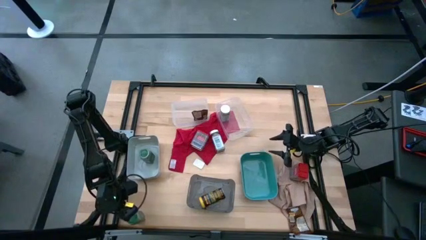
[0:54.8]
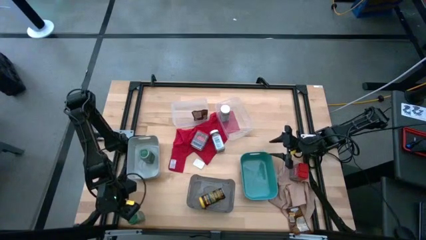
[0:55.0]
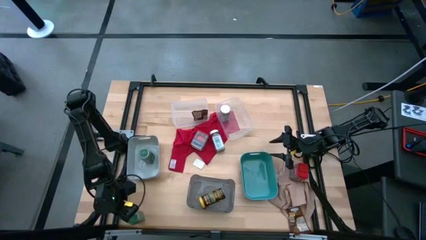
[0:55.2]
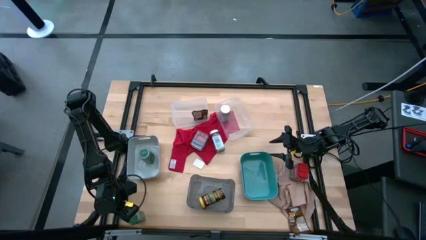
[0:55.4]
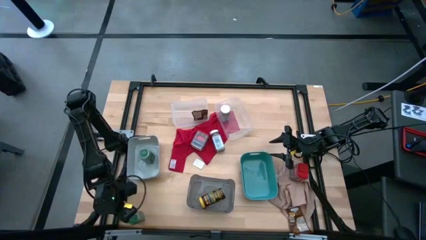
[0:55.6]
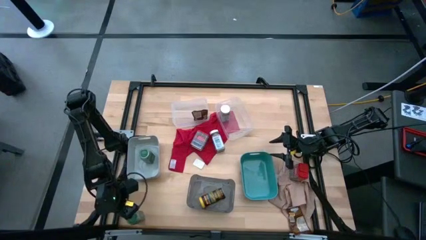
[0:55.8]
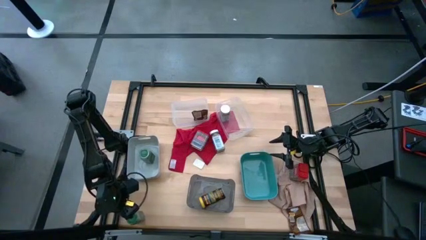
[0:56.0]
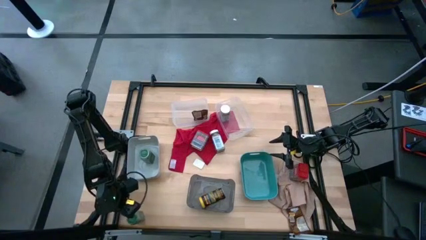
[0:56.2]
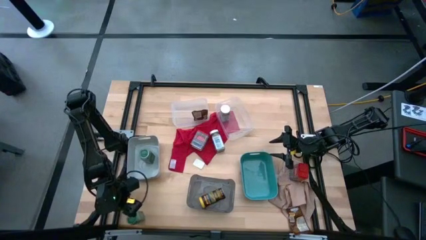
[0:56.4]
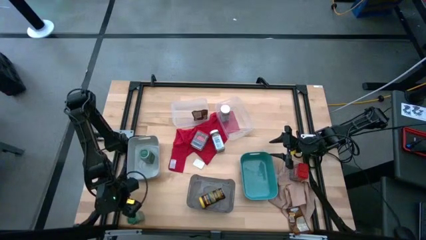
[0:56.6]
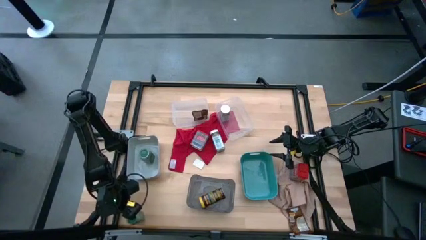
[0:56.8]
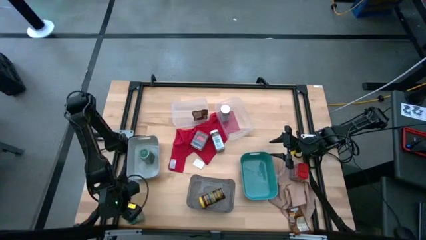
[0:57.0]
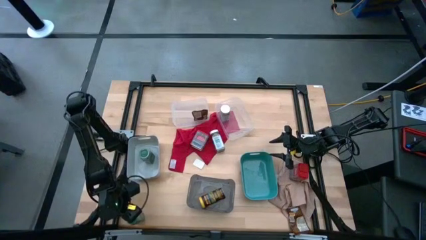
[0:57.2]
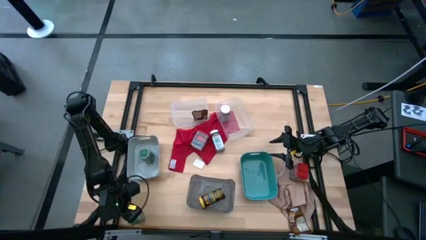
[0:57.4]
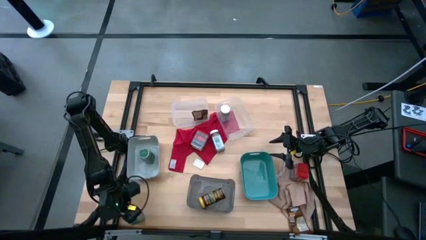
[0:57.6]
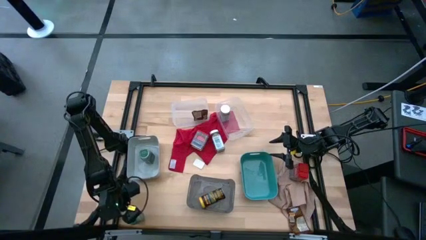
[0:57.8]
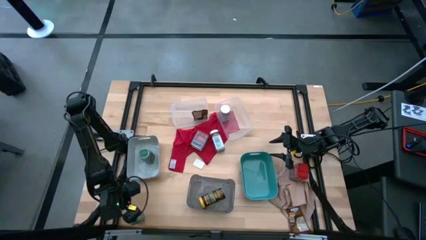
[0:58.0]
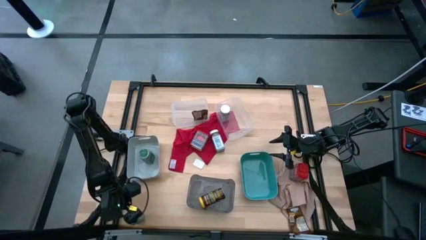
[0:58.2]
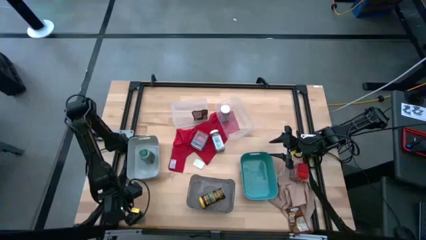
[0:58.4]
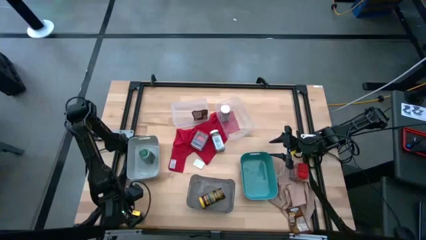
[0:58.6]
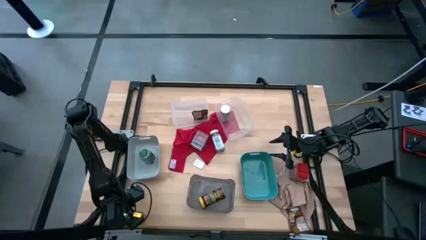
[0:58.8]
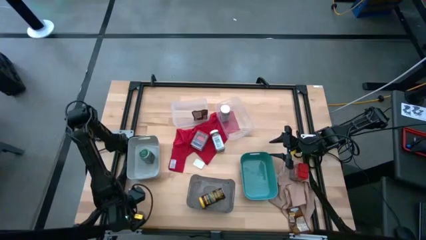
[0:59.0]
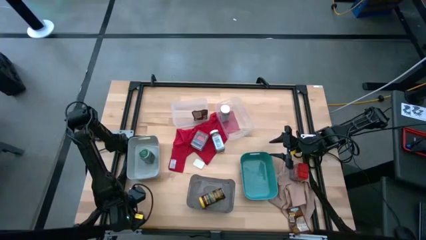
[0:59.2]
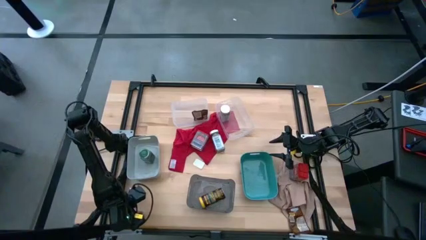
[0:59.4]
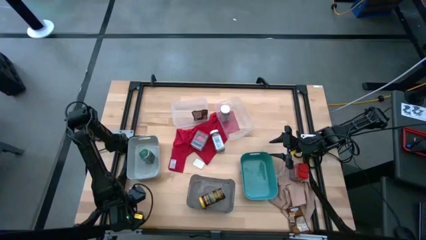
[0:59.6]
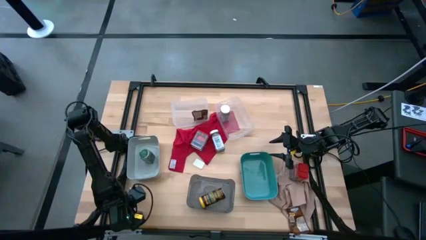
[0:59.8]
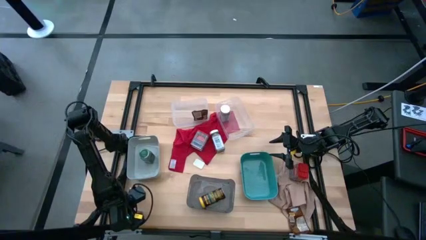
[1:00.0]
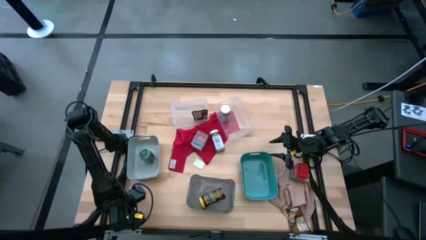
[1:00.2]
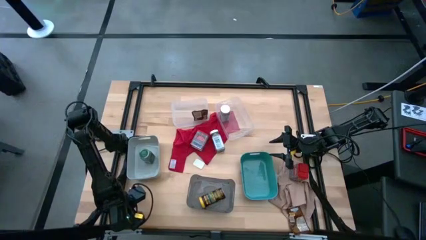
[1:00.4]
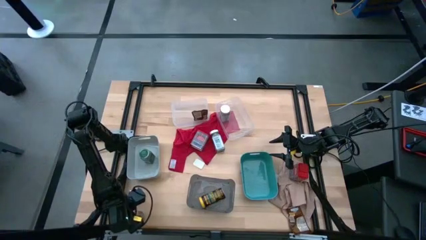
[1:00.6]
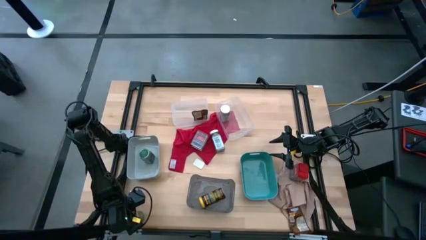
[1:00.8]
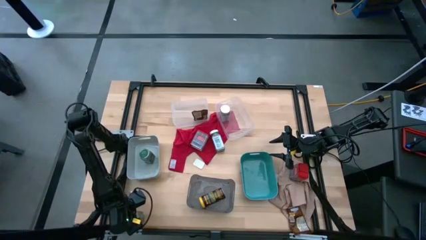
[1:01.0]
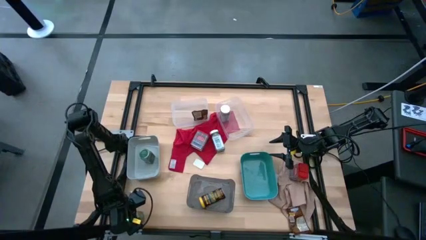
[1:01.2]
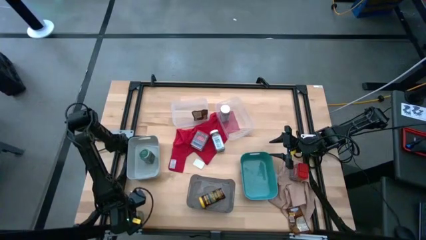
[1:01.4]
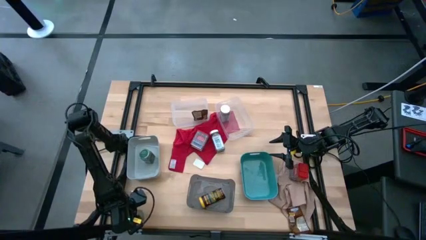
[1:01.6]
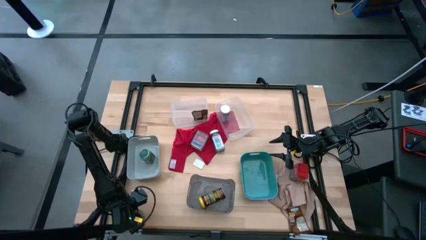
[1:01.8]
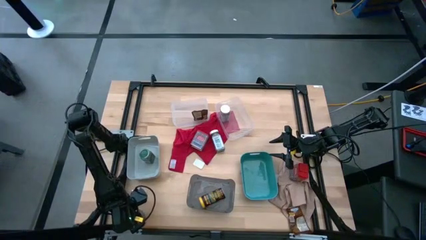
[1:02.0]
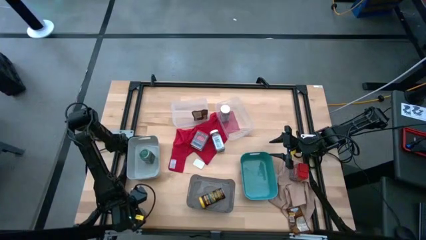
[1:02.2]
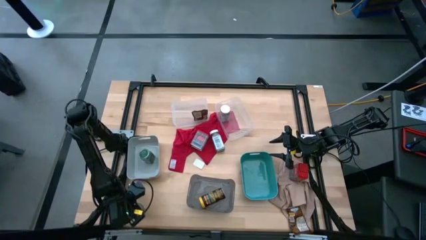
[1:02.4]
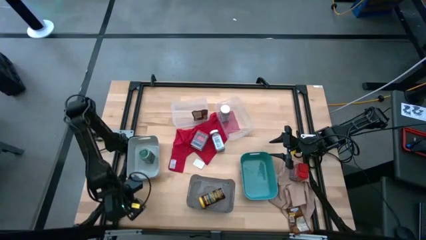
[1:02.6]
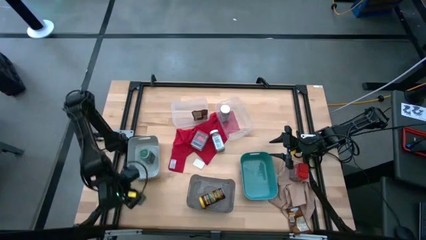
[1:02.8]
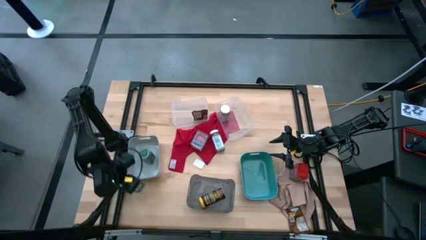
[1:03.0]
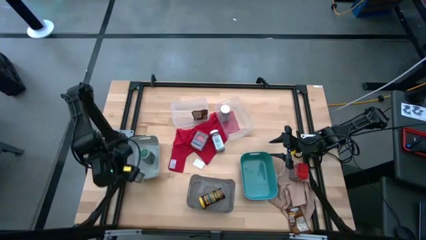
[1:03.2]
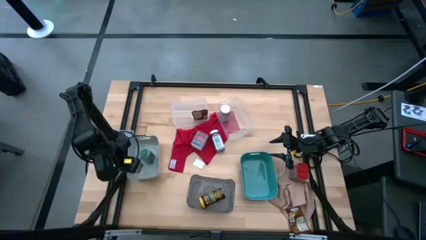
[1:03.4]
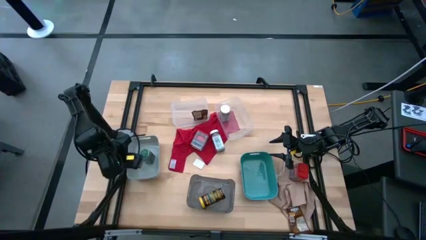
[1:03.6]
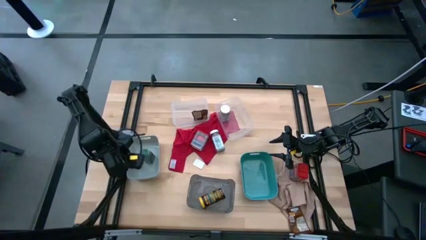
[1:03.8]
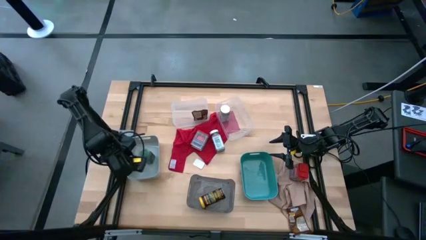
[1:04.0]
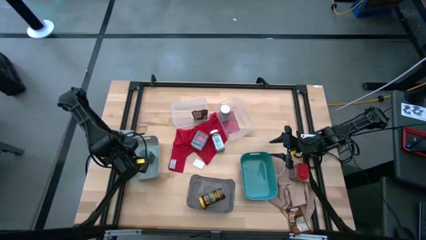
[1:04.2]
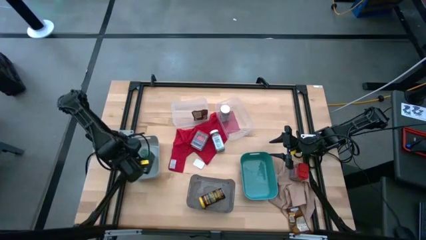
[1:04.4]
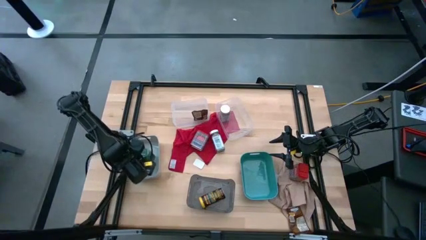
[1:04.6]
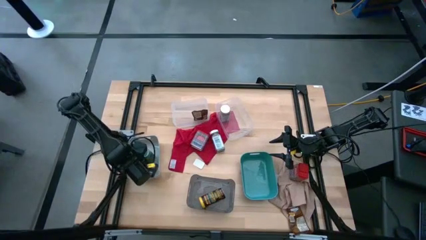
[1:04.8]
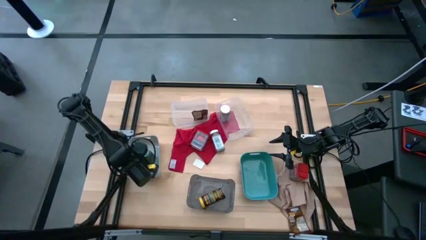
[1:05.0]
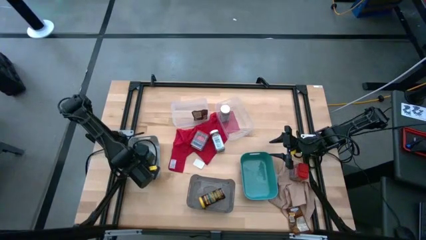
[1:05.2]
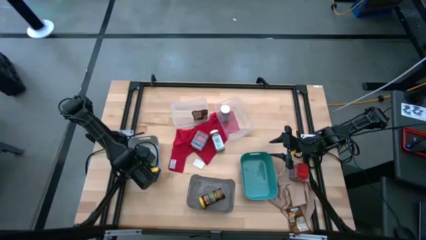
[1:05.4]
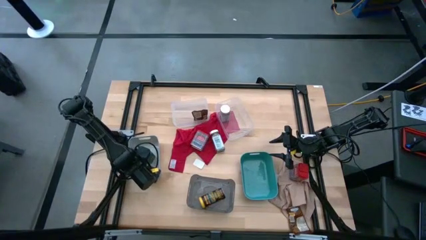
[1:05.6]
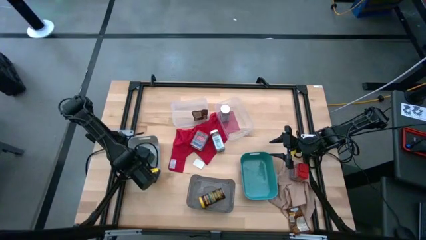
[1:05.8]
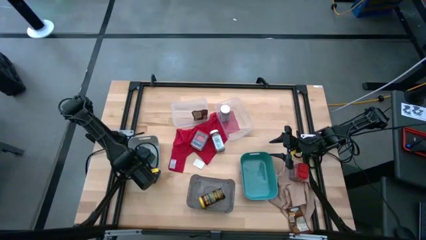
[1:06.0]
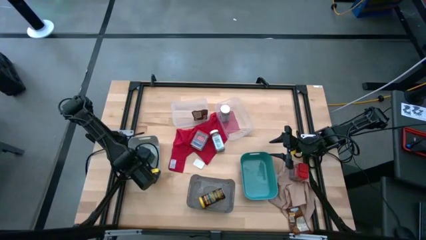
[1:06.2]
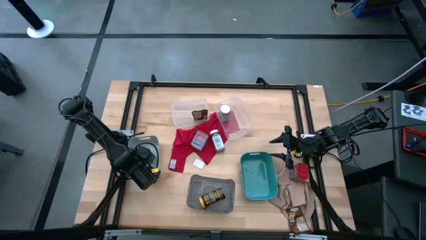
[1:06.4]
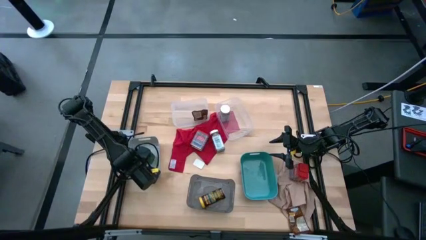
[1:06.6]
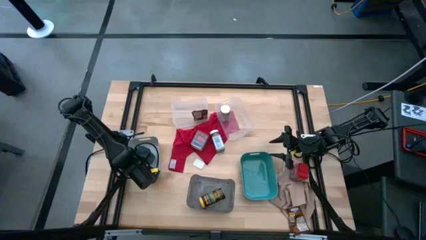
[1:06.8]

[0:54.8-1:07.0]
Task: Sort spices by type
Put the green seasoning bottle into the gray bin

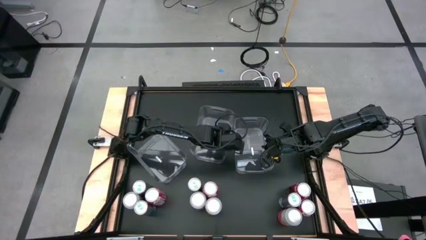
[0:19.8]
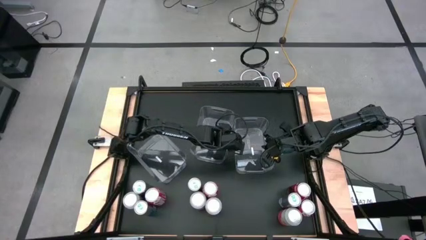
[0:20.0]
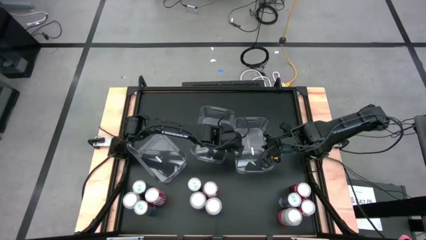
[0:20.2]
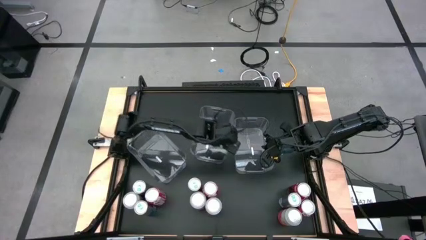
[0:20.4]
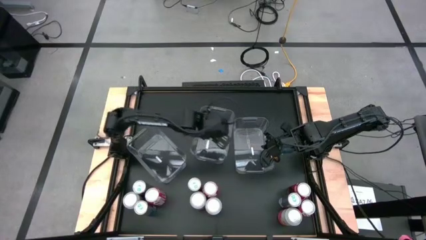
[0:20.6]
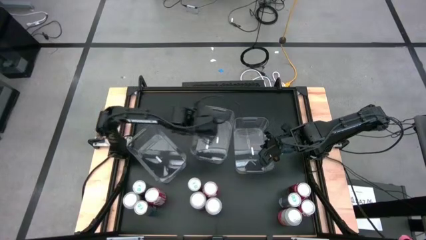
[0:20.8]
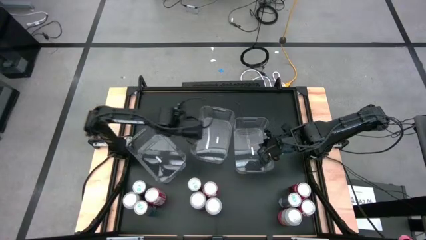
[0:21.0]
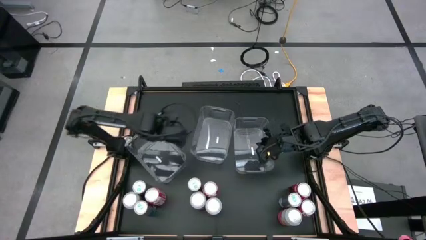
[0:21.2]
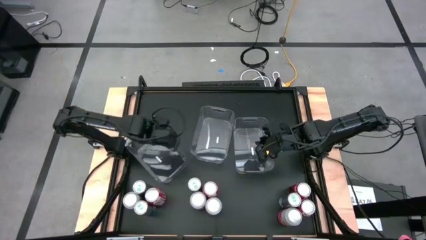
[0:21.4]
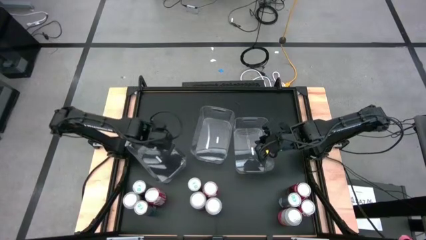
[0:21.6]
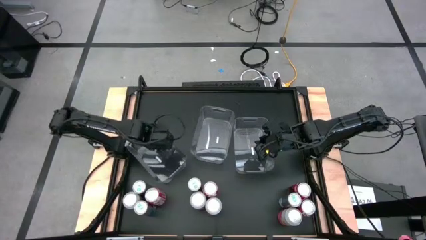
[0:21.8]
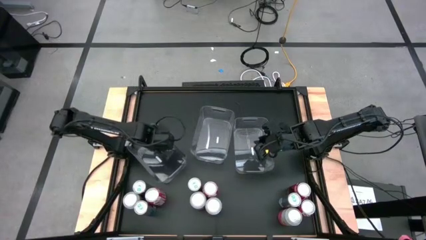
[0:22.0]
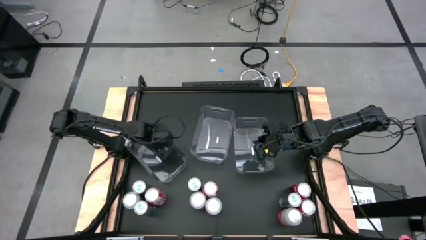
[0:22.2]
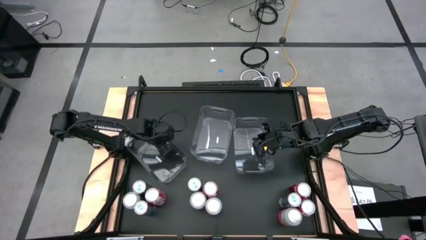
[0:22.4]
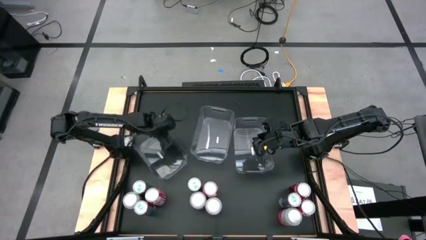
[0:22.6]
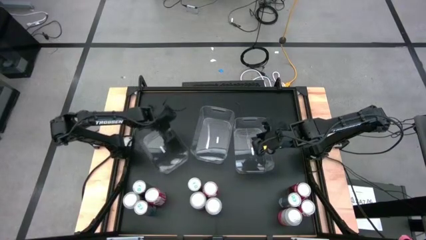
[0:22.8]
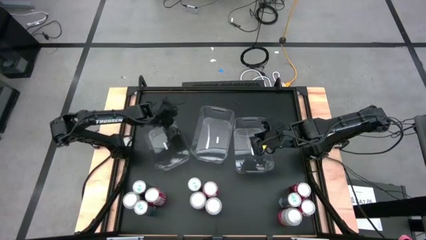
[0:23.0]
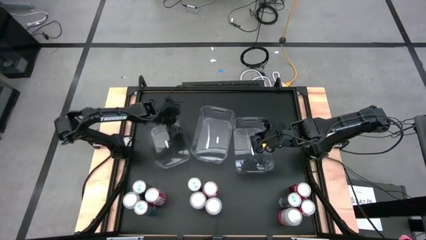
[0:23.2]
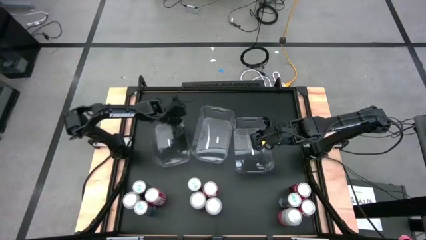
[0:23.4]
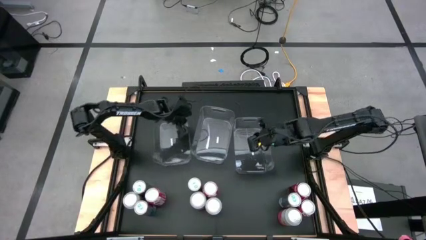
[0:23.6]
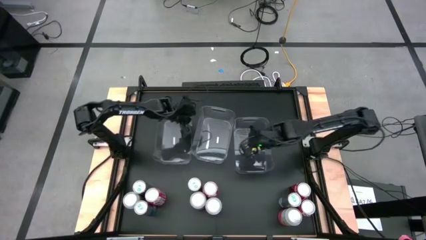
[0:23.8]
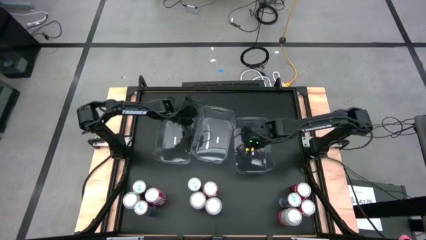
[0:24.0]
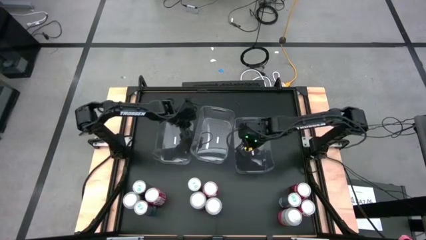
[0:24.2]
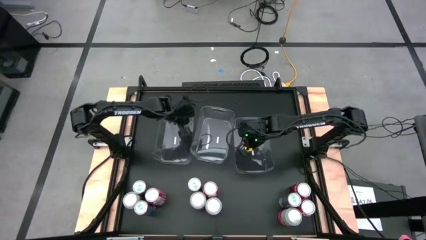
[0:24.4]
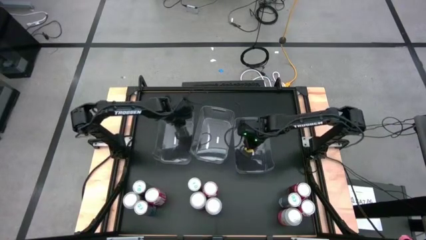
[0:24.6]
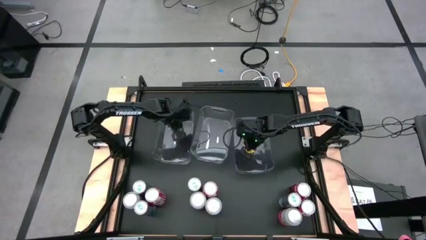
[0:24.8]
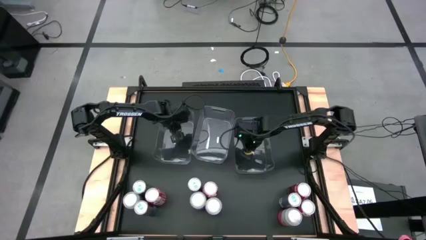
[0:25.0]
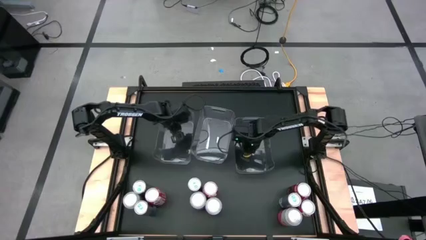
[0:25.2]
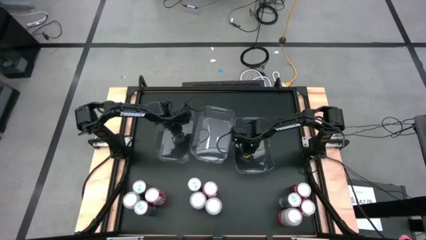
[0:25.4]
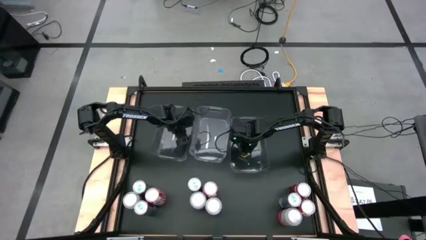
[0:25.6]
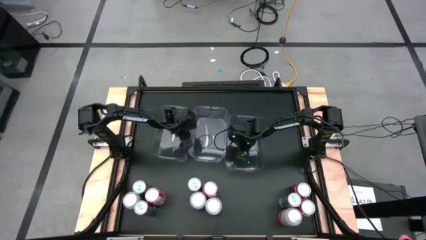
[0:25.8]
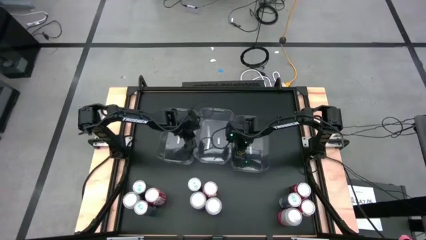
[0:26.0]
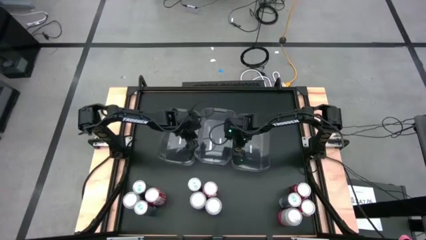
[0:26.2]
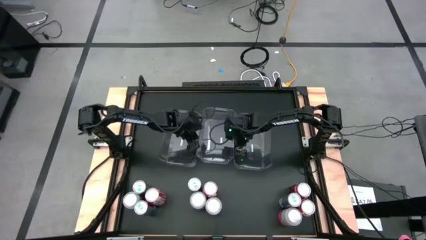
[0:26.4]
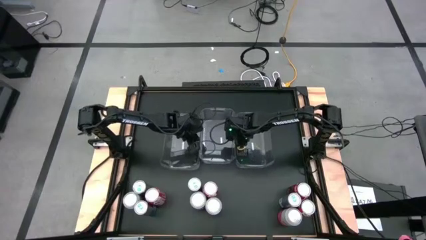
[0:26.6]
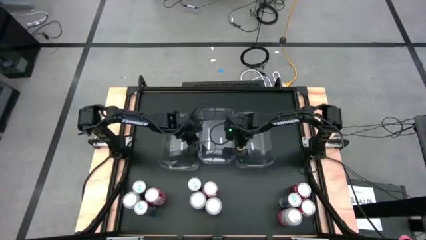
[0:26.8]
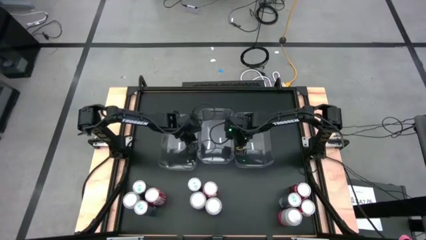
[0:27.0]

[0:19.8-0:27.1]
Task: Sort soda cans
Adjust the transparent bins
